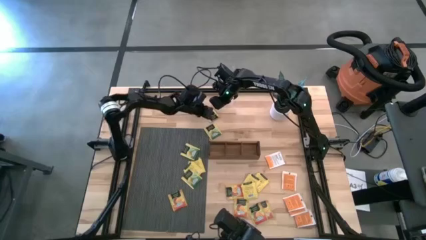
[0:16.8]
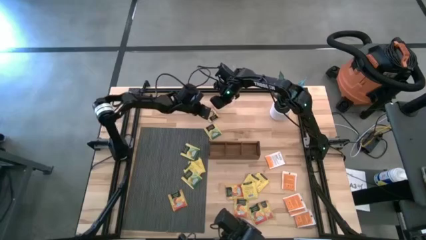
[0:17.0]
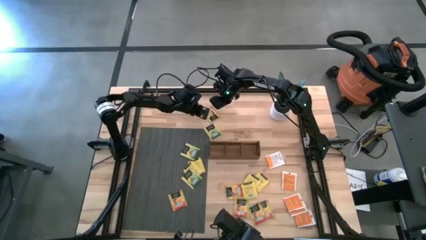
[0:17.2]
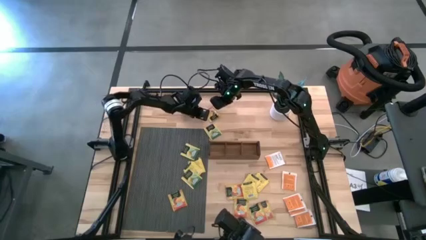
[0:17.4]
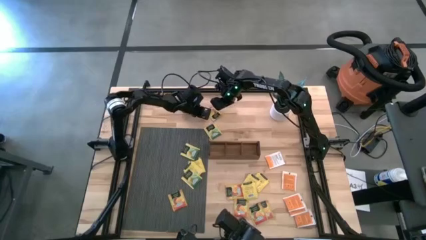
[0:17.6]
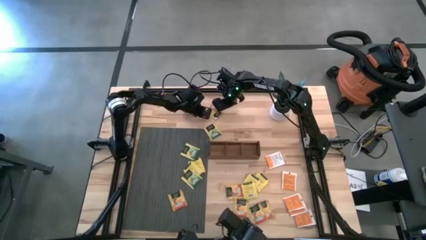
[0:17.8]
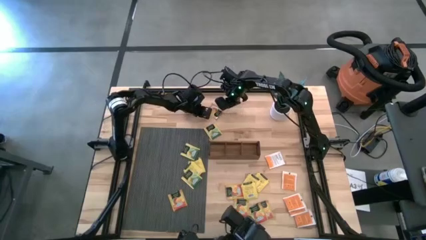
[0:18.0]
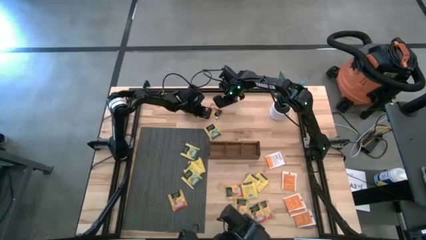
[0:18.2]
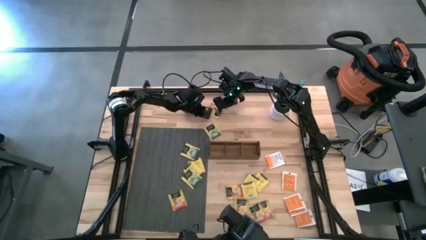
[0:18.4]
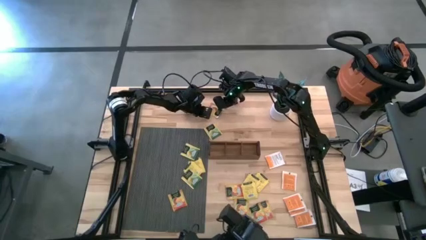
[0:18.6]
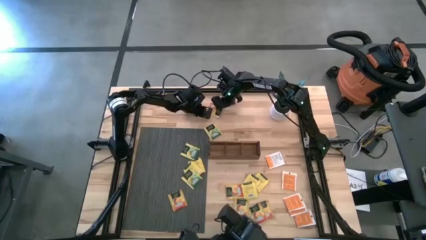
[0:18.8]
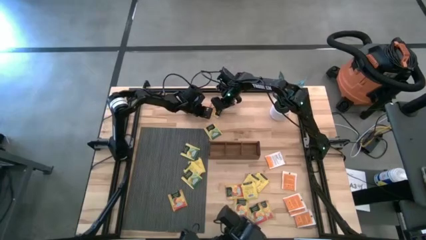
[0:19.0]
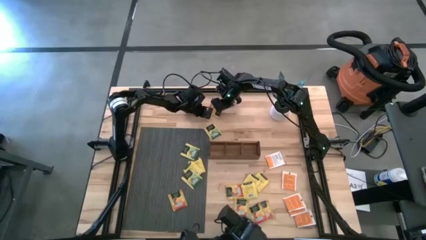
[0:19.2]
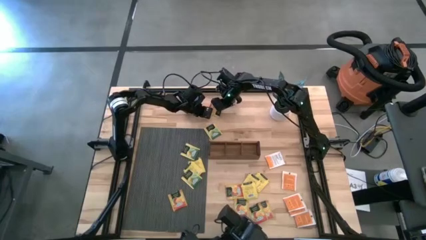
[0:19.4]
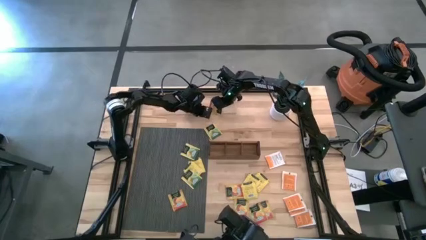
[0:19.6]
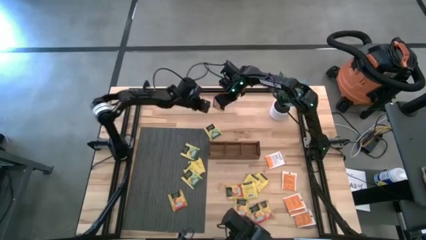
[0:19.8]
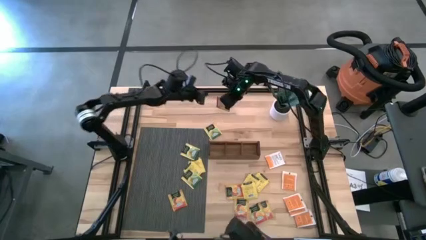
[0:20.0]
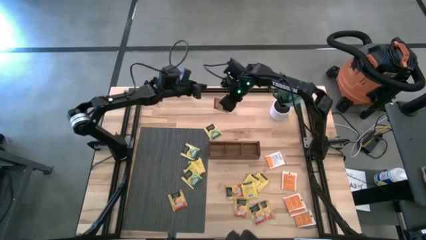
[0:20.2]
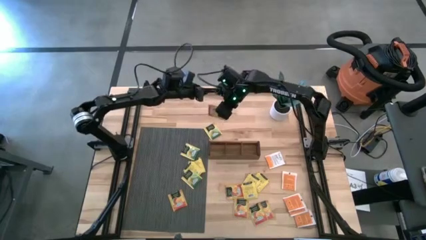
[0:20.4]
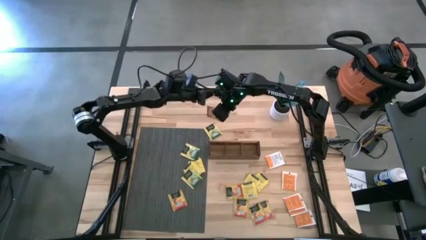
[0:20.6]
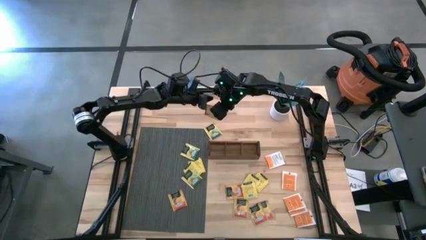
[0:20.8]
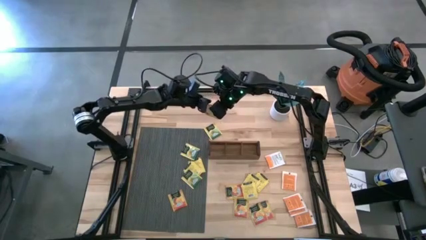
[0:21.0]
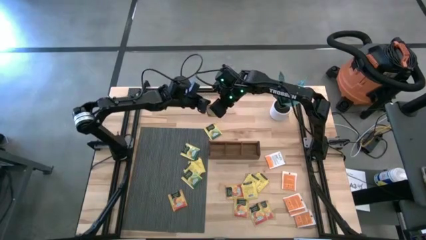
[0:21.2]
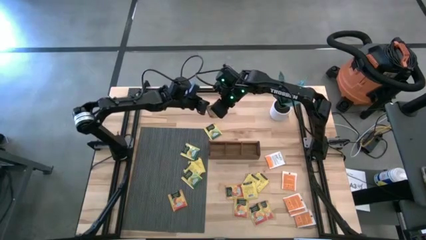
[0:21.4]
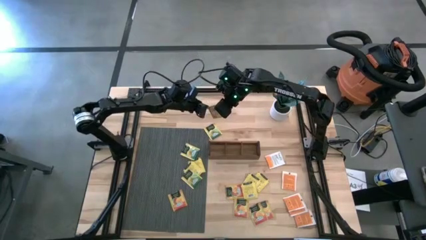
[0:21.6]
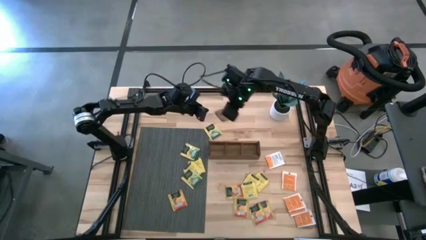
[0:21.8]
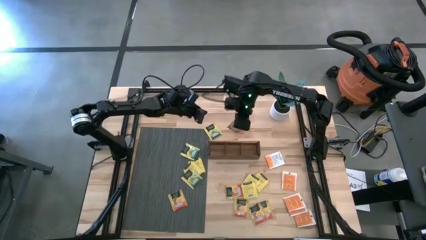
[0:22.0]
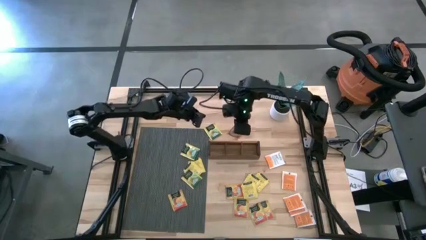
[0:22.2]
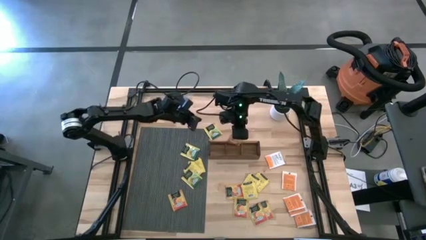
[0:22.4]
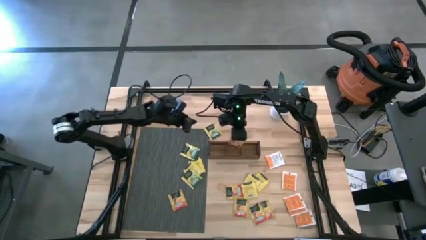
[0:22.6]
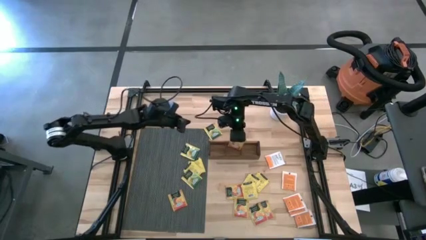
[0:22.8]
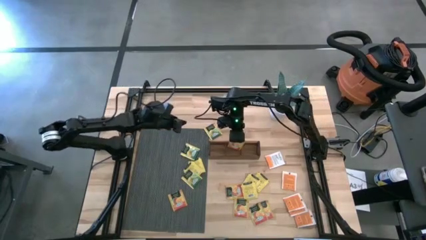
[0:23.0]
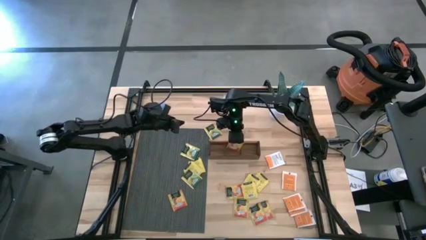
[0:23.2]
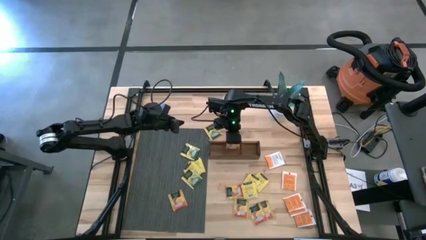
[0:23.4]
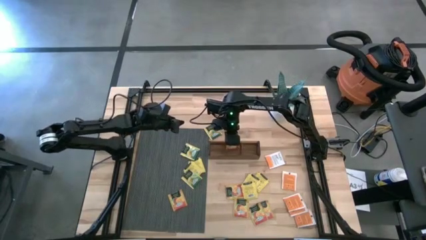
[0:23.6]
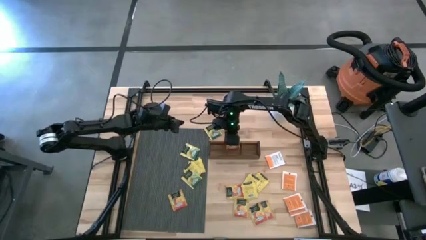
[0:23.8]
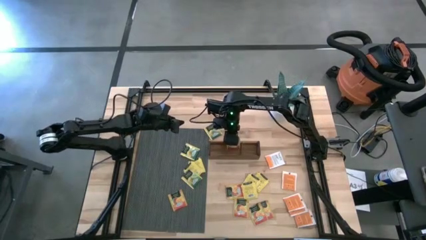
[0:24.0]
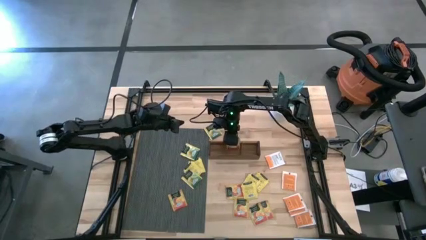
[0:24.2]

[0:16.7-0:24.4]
Task: Pick & Place Tea
Put the orange tea bag into the left section of the wooden organizer

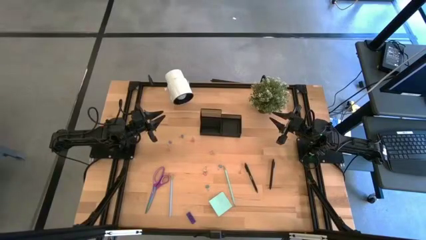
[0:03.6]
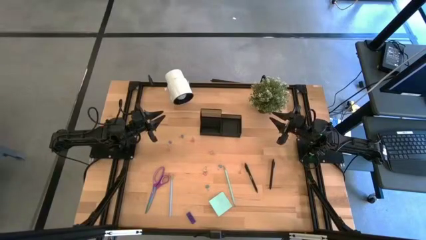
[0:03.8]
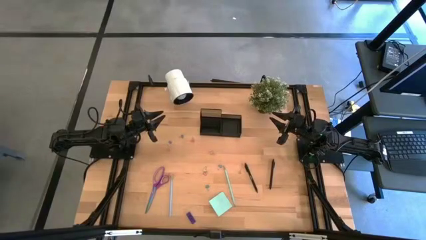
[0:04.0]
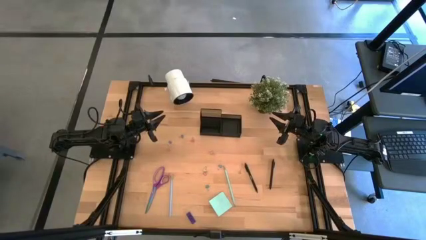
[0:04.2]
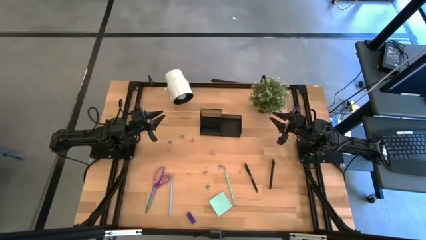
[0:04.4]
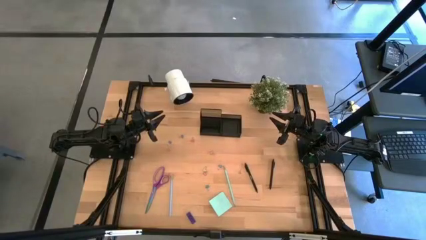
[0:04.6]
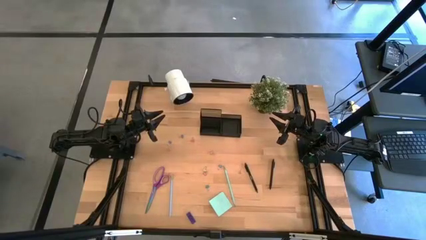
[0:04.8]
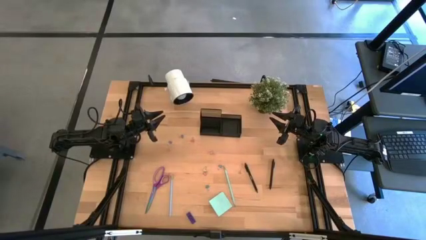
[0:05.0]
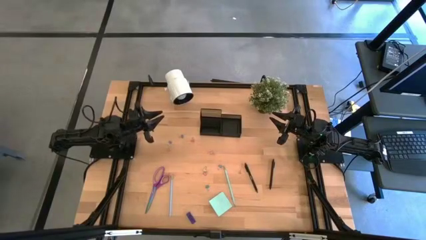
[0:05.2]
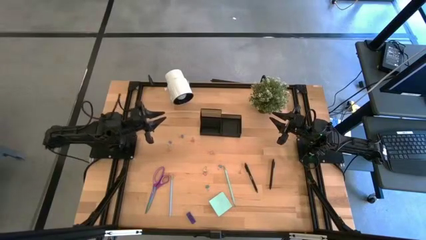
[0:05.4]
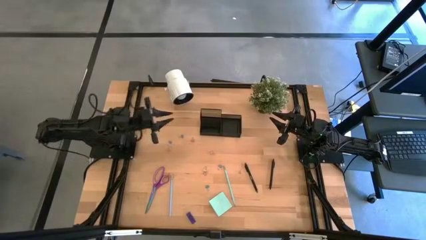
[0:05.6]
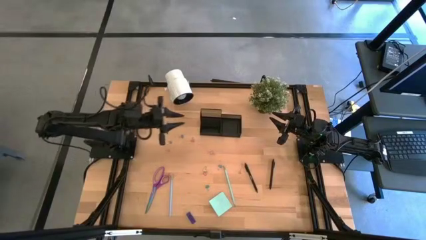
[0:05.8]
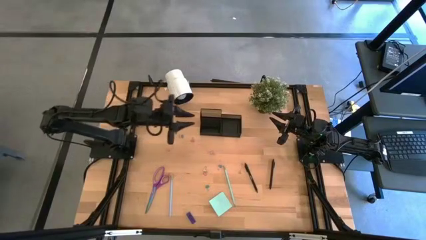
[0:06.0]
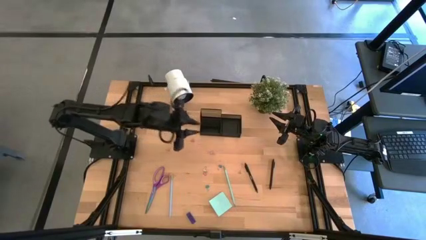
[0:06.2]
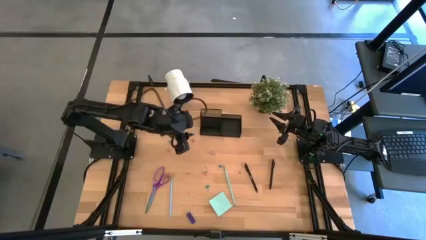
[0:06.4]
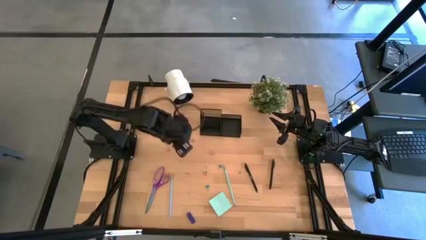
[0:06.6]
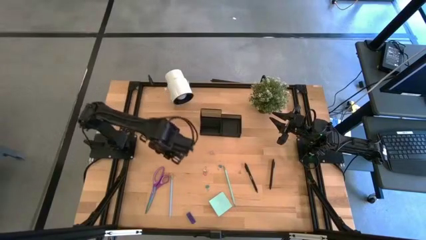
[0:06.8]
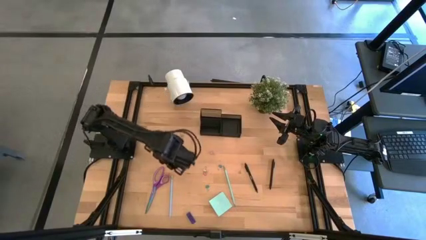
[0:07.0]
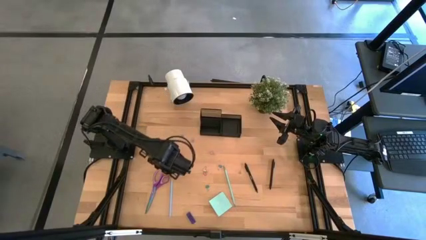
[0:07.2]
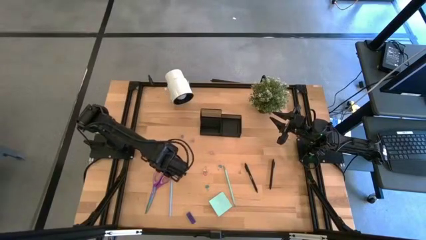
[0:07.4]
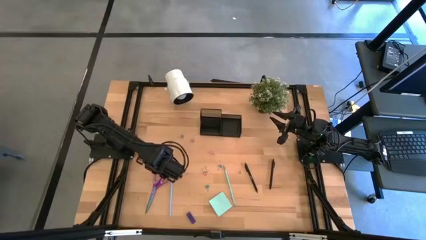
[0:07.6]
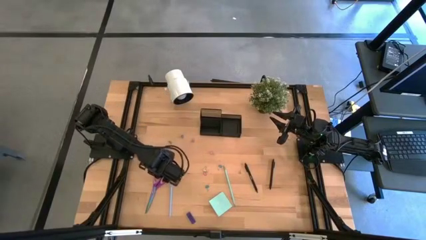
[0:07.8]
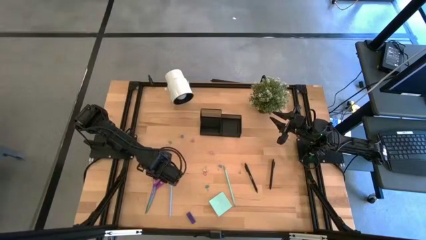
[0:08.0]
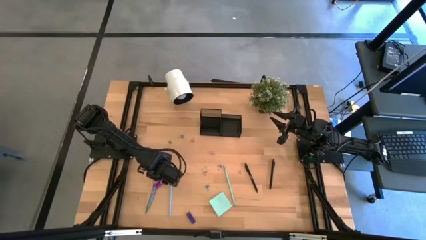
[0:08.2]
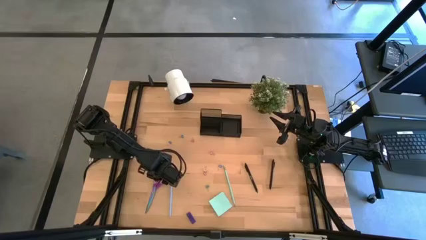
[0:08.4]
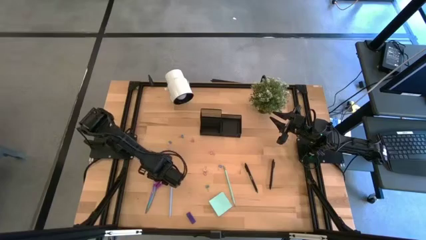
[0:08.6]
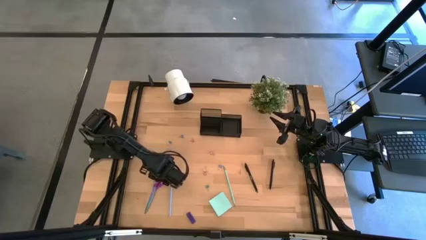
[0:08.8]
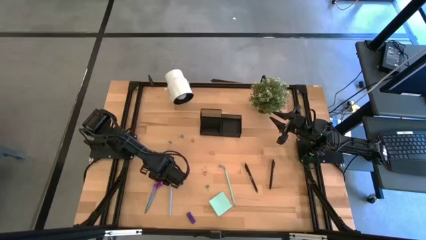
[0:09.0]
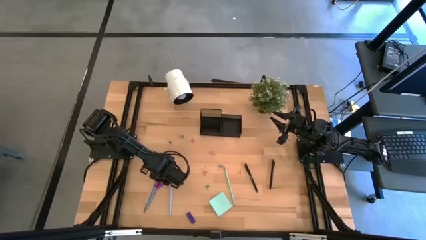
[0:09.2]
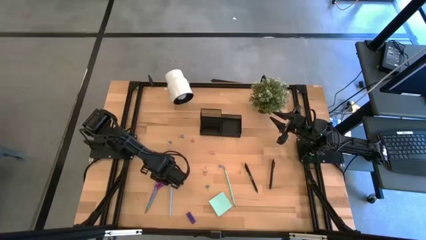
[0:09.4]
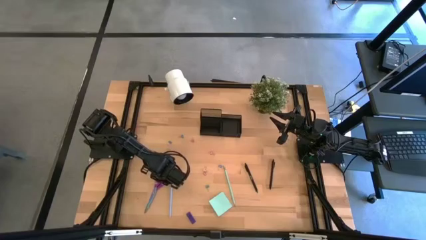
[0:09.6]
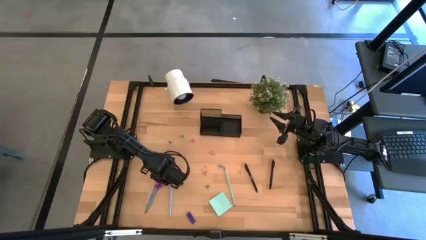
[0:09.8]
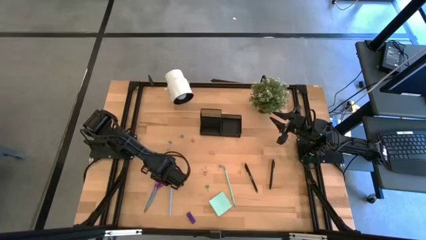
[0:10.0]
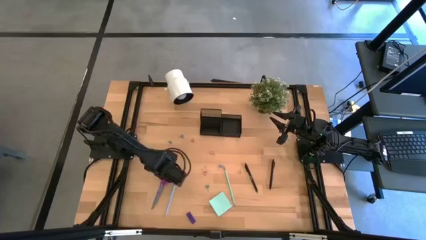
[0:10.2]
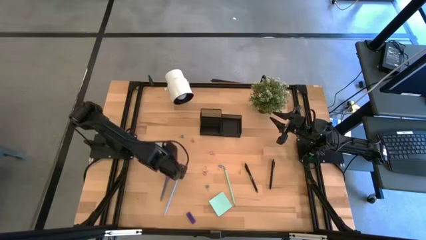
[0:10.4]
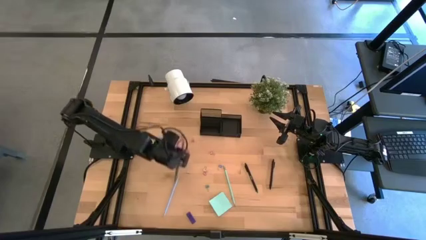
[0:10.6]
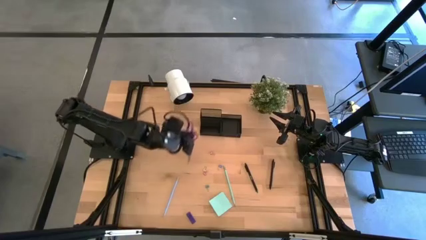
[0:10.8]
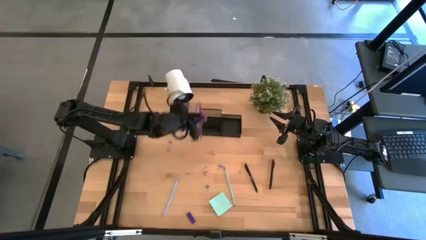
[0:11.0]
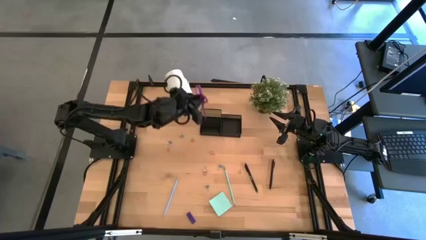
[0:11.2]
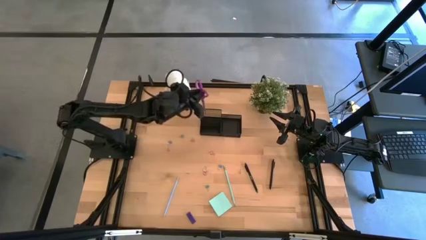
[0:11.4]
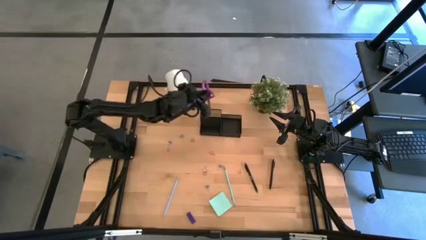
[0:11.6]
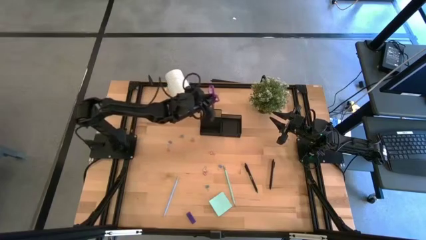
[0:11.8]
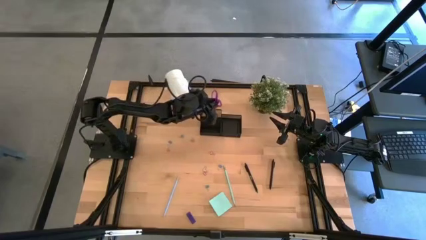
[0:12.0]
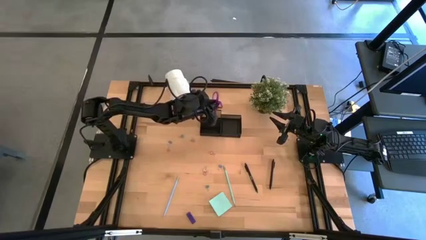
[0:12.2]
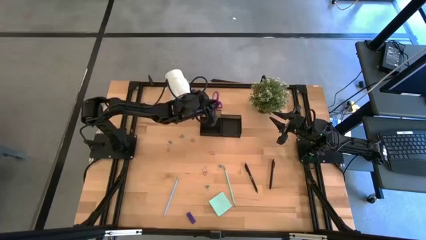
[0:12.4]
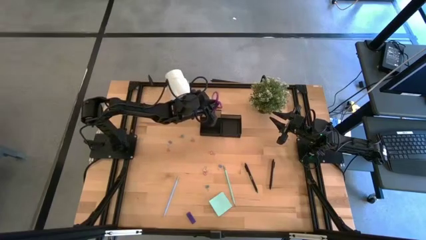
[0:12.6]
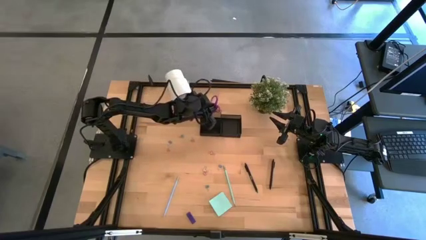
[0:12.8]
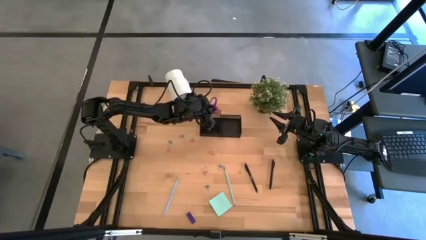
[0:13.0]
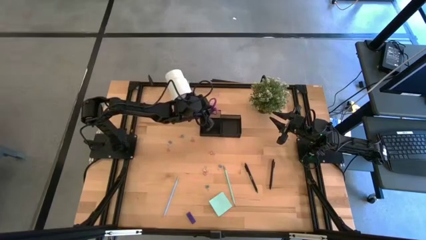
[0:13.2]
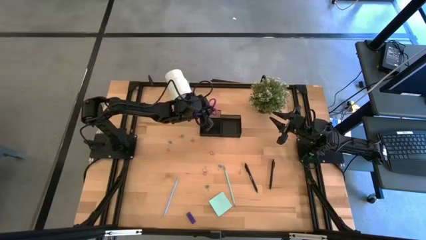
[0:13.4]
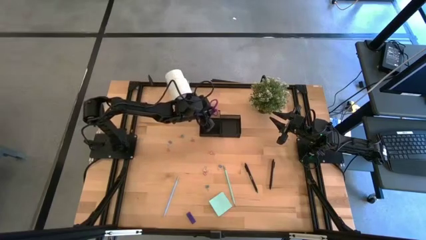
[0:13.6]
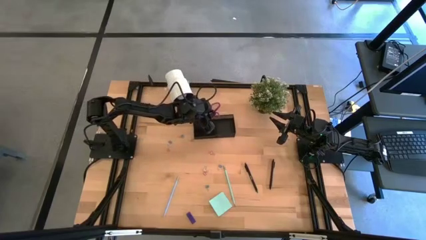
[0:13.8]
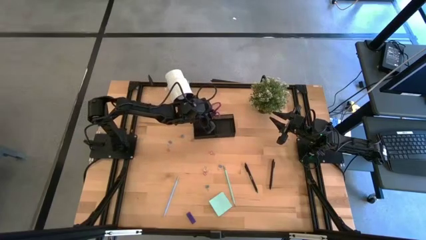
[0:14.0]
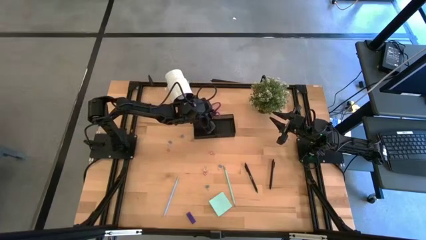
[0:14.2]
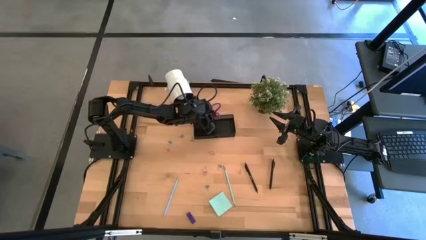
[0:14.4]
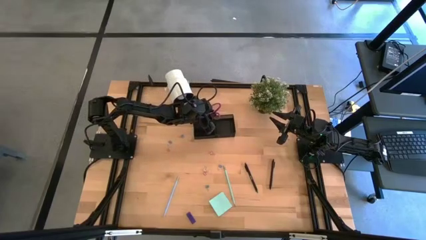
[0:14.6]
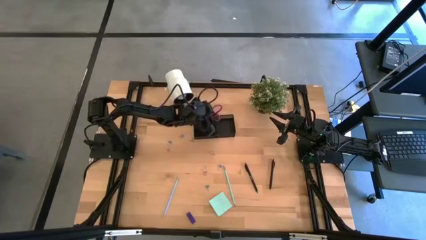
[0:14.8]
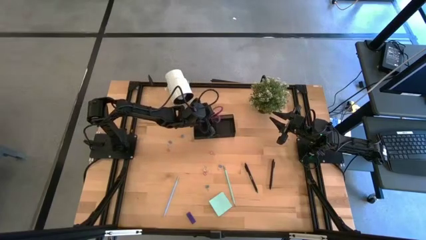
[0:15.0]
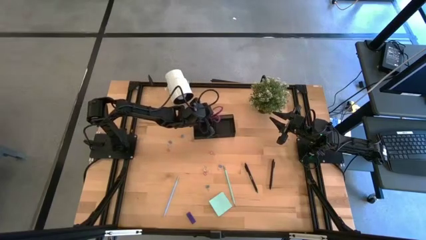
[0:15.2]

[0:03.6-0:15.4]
Task: Pick and place office supplies into organizer
Put the pink scissor into the black desk organizer
